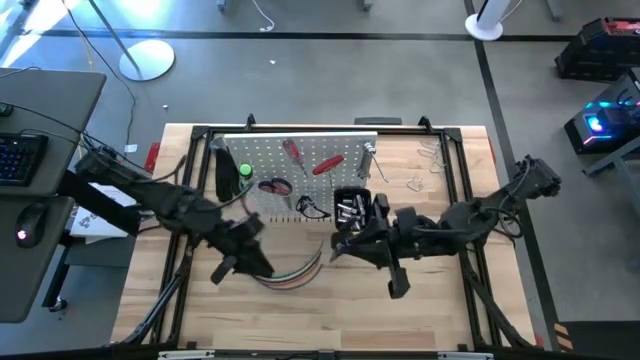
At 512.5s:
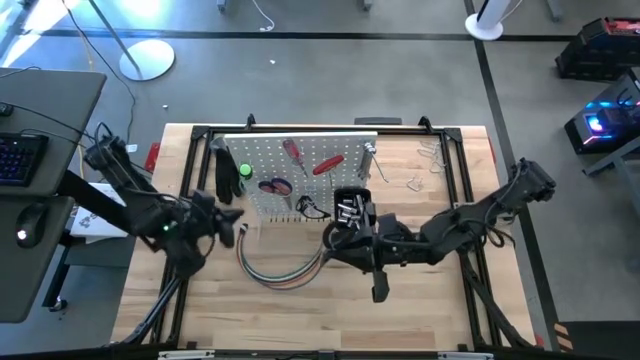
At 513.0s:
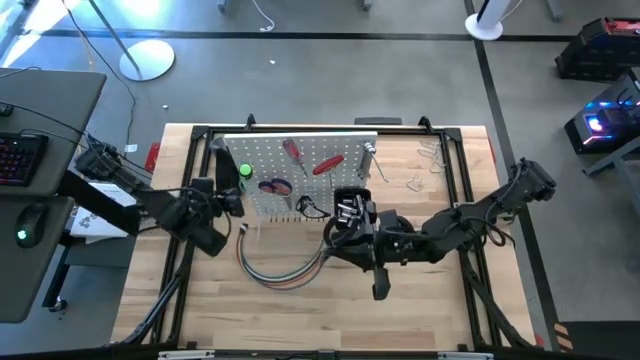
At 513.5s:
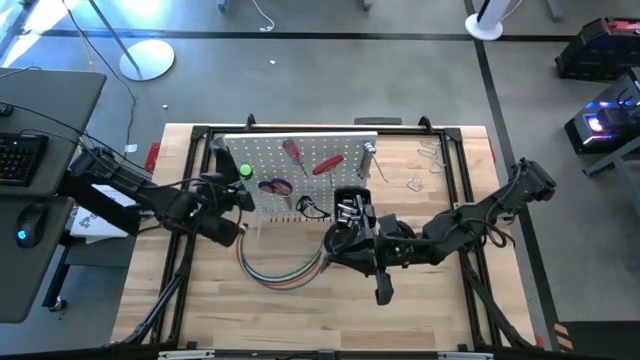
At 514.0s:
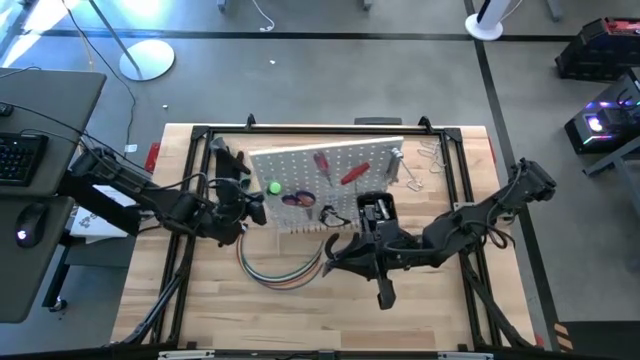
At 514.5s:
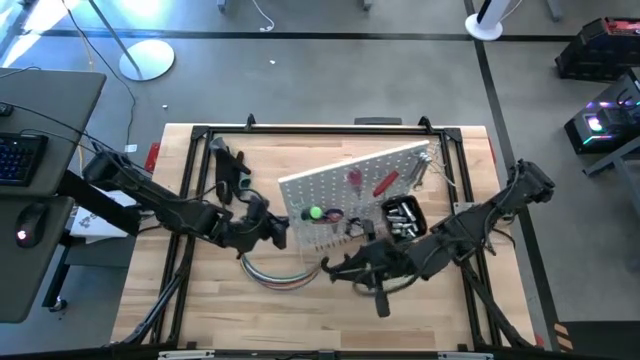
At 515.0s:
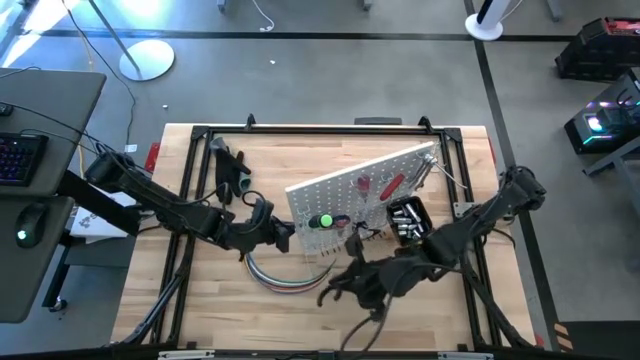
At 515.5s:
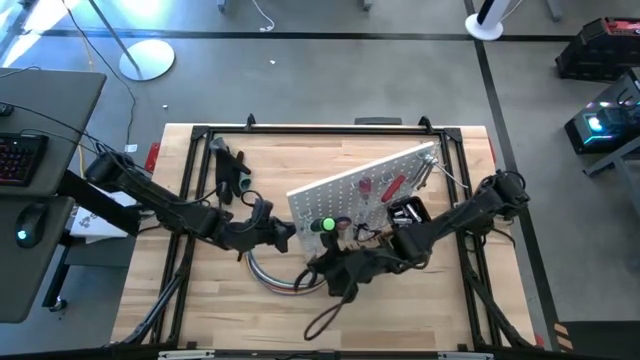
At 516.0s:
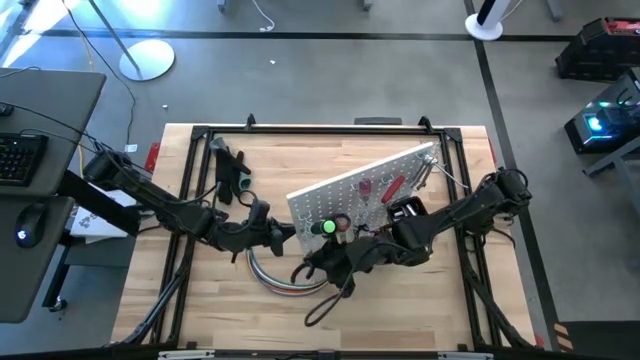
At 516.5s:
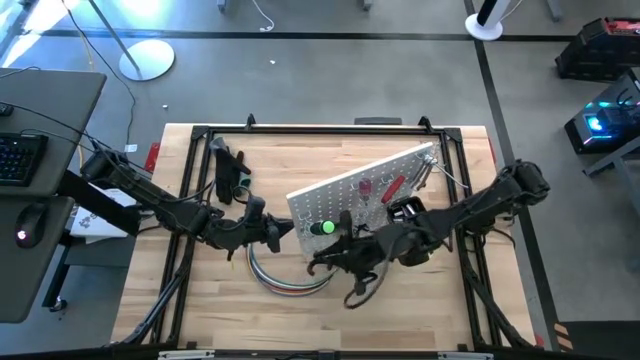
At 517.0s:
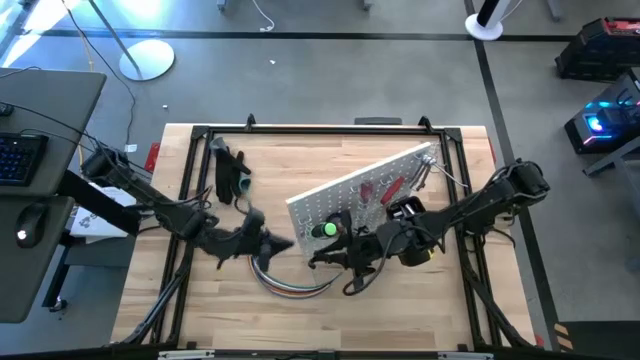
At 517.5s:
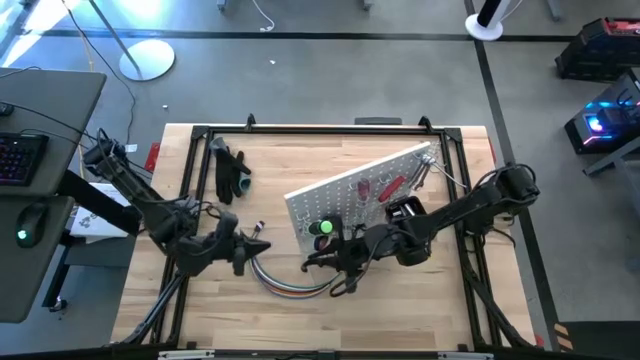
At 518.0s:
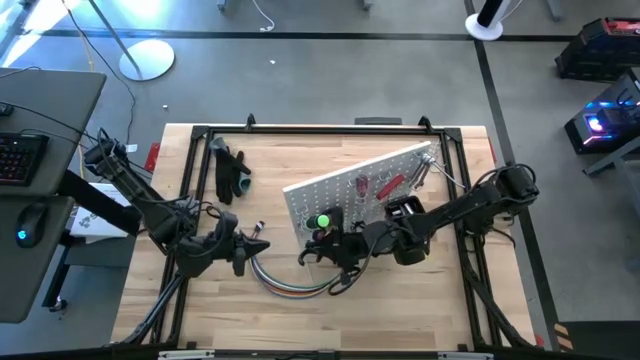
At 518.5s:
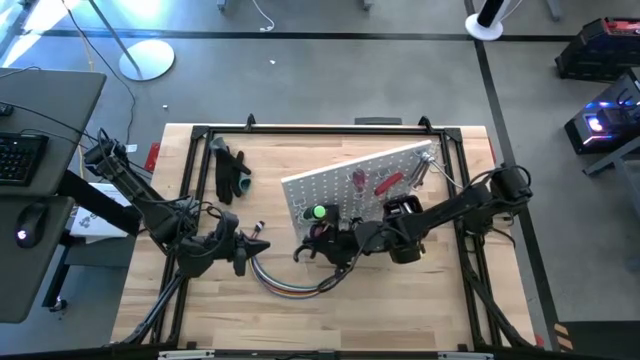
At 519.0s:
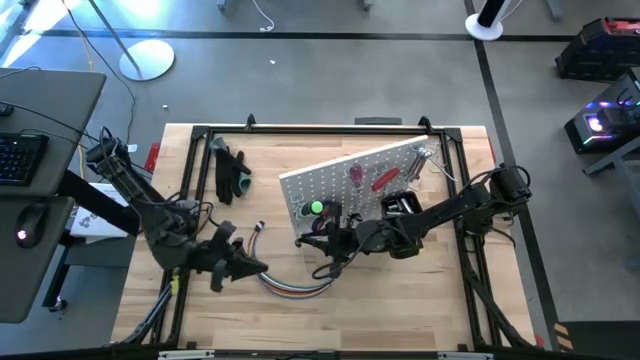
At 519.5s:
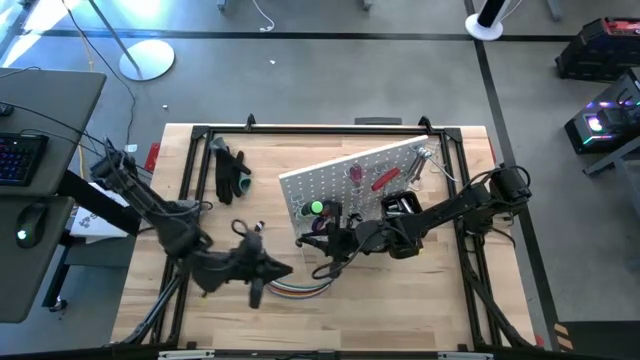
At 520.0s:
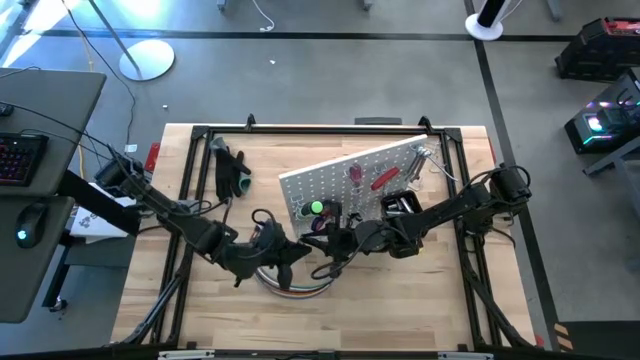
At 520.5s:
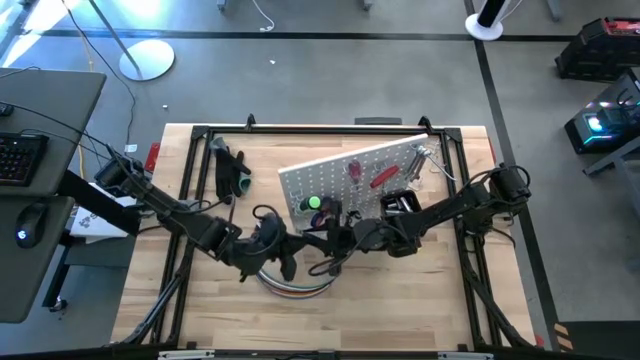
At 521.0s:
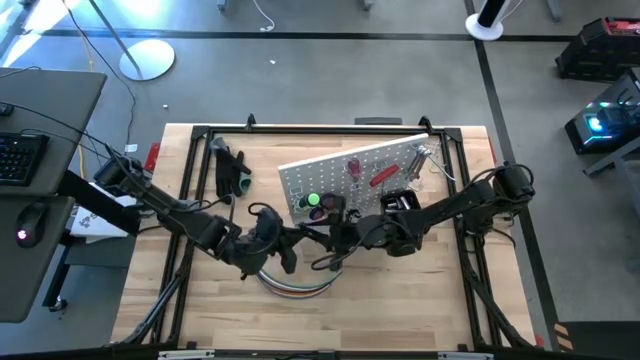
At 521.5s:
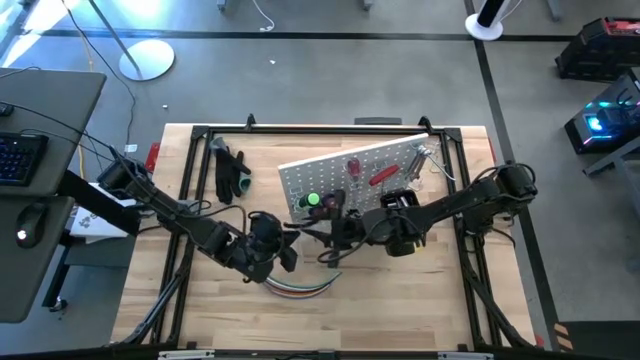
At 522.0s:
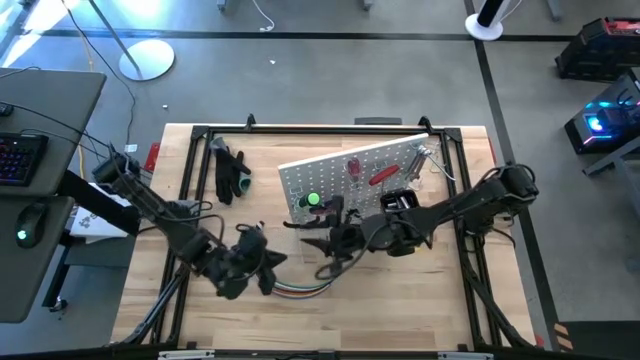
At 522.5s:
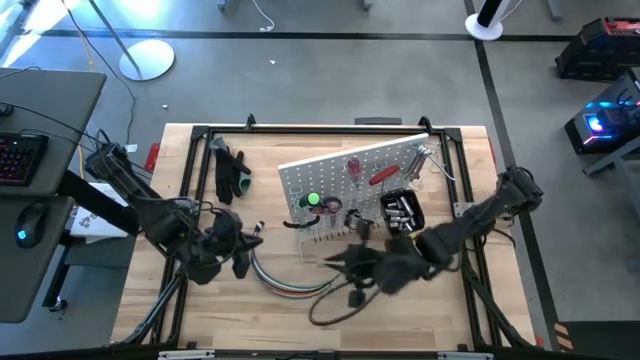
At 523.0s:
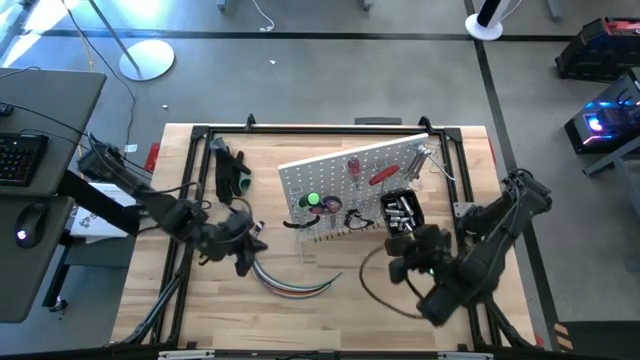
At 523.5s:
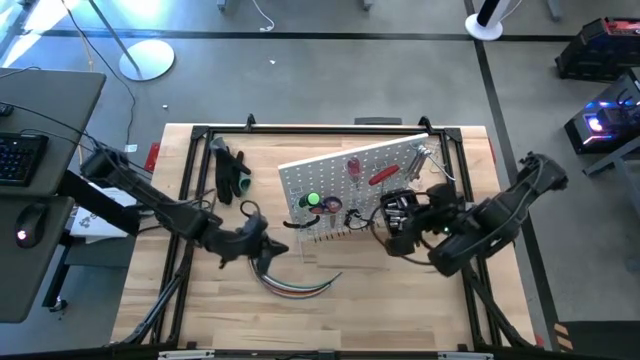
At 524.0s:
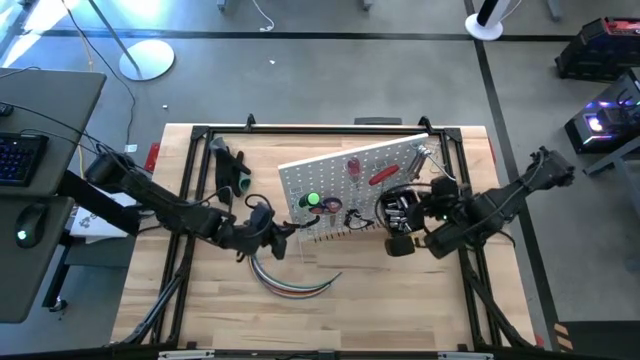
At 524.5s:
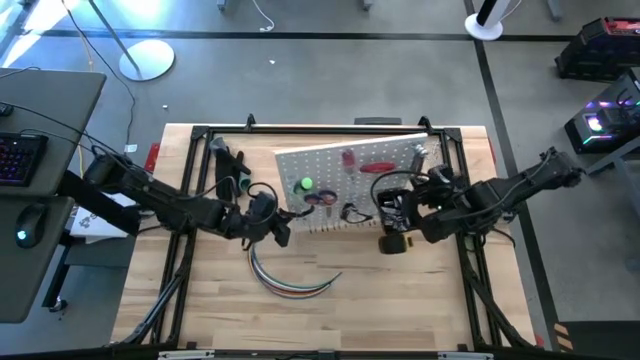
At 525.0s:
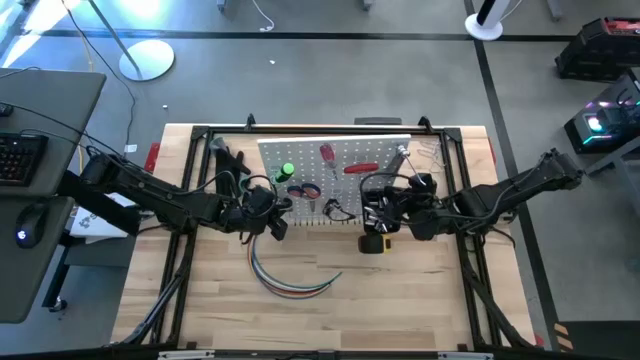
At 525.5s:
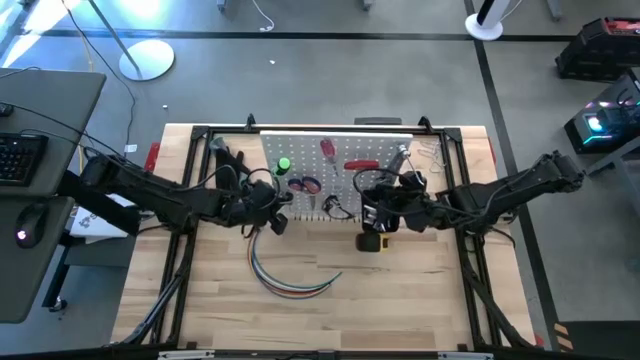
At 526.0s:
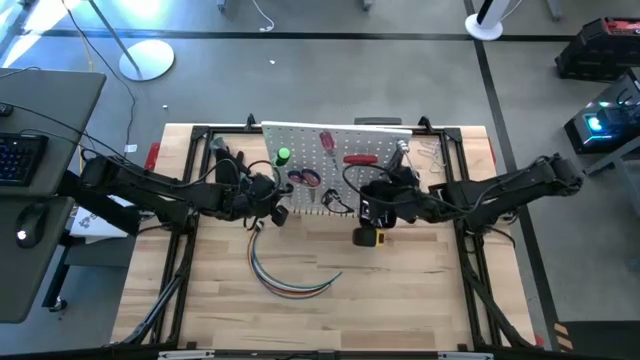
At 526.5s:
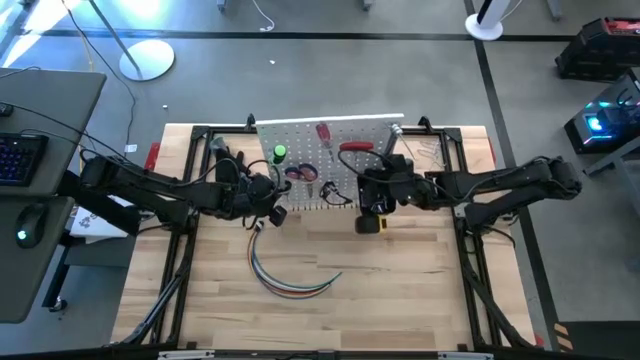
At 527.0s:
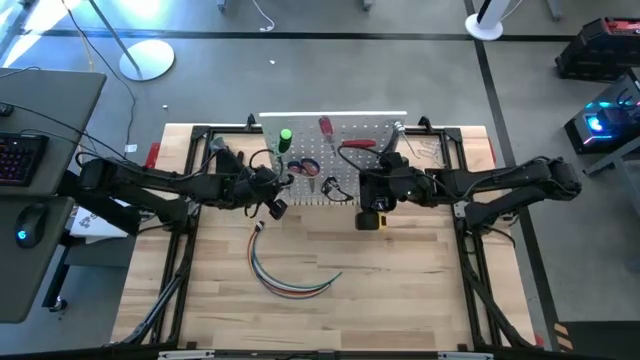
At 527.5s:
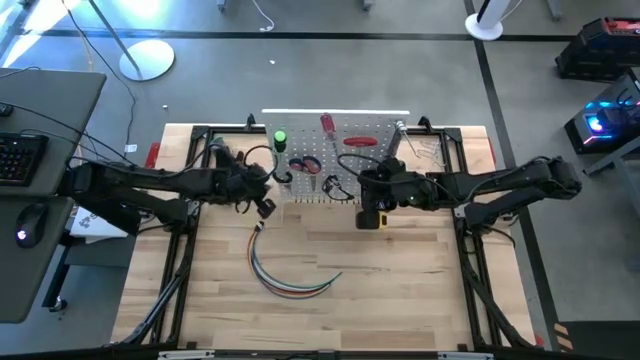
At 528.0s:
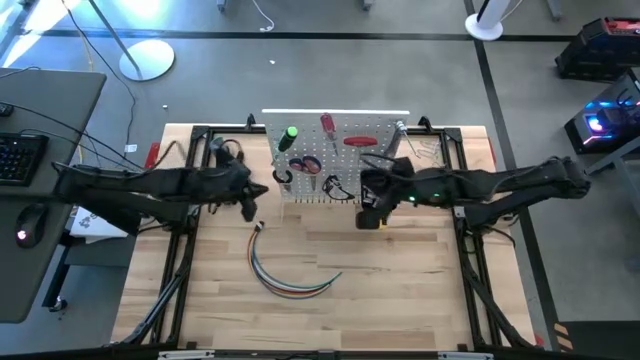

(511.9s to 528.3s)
Task: Hang tools onto peg board
Hang the plier on the peg board
